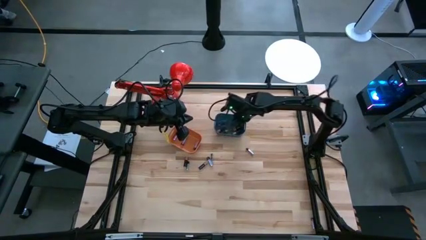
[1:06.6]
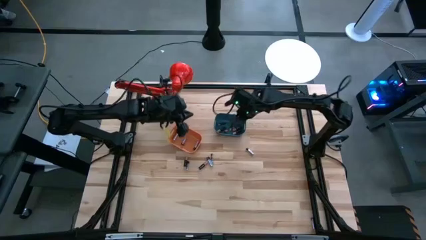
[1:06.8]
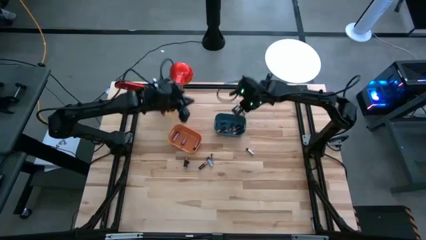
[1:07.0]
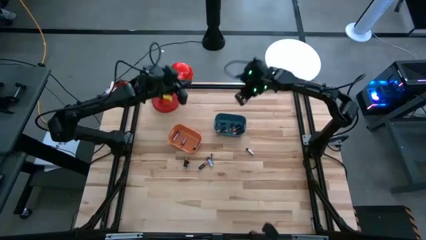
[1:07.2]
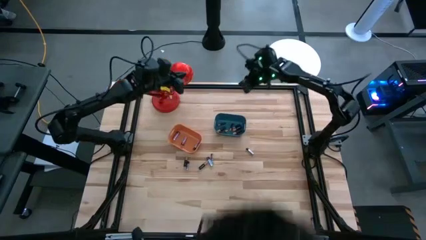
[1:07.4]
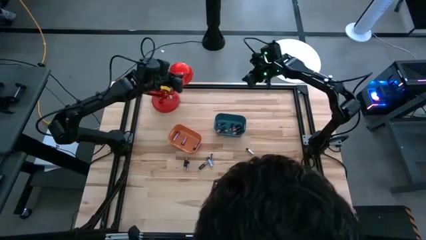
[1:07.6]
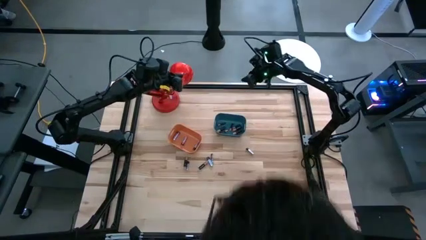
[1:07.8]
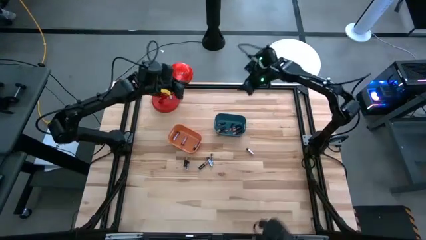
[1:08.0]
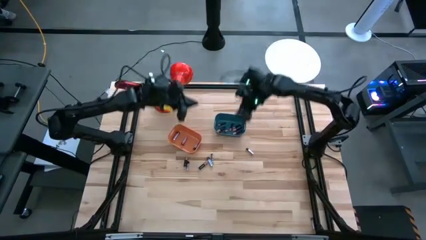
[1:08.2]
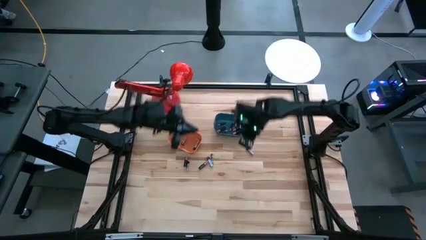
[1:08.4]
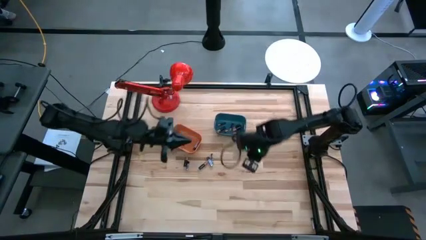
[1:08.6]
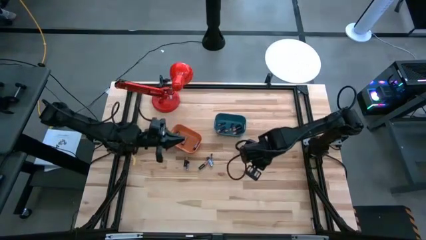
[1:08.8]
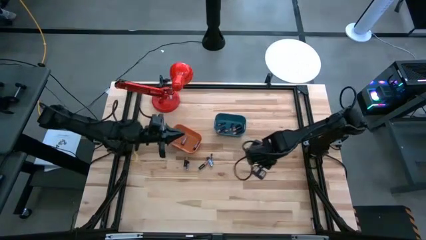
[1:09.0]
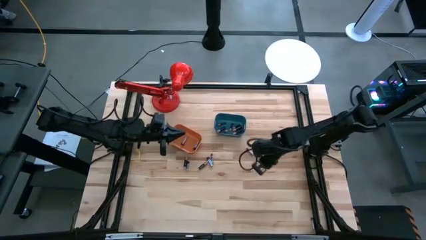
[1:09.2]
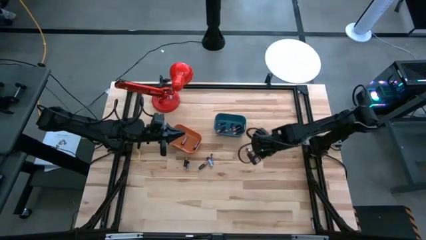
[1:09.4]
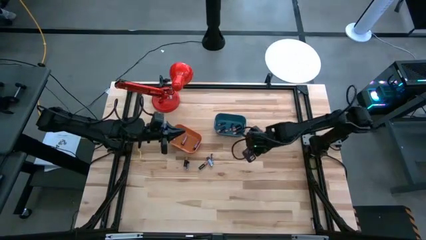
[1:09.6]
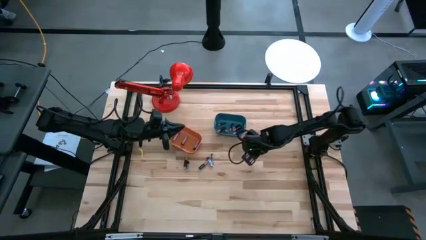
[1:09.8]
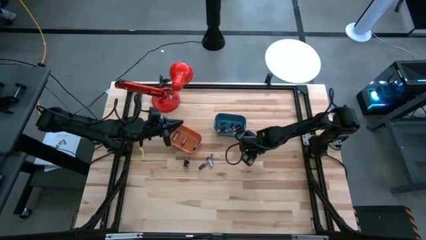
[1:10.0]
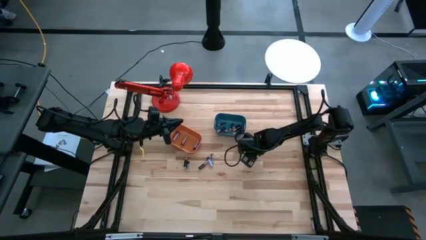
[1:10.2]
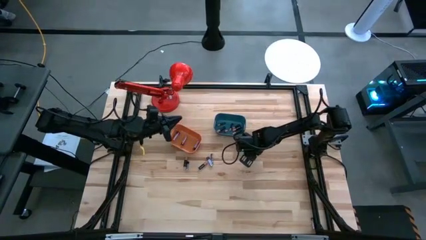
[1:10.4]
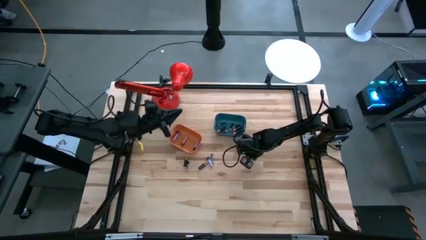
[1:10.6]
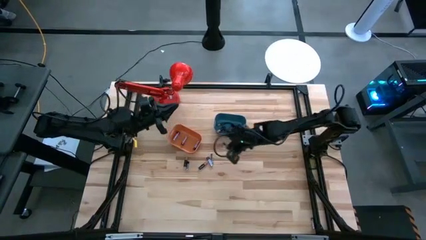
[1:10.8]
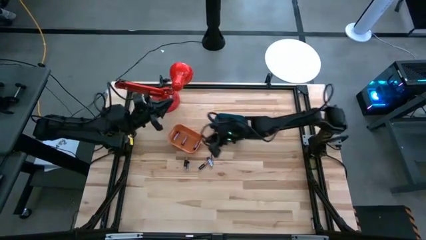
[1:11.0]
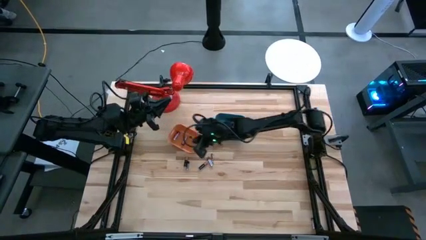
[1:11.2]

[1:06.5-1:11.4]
Task: Sort batteries
Put the silver battery into the orange bin

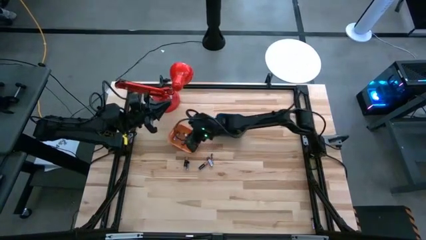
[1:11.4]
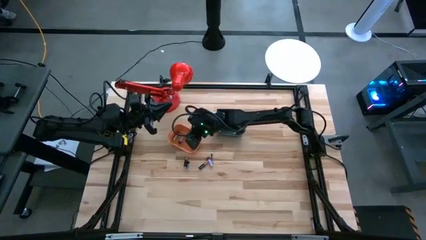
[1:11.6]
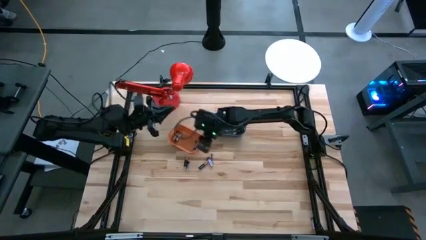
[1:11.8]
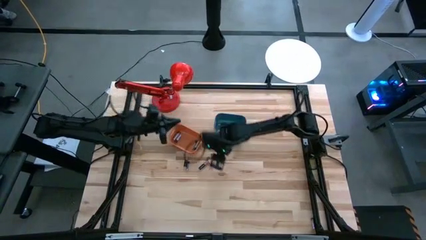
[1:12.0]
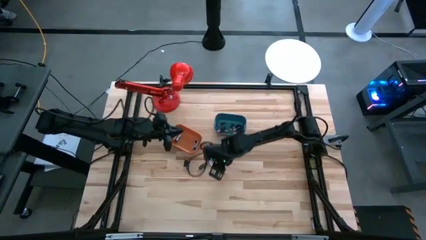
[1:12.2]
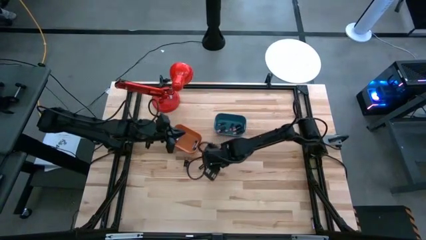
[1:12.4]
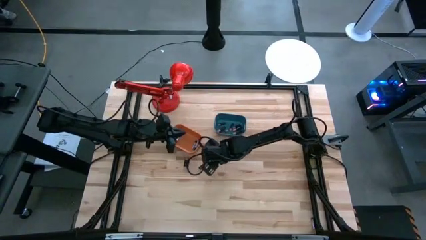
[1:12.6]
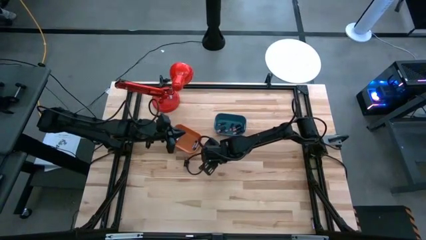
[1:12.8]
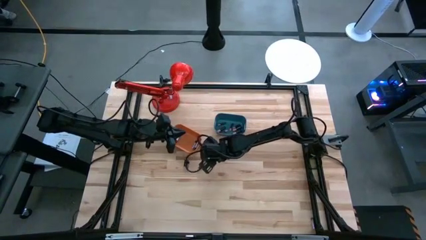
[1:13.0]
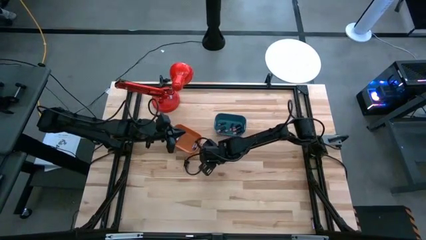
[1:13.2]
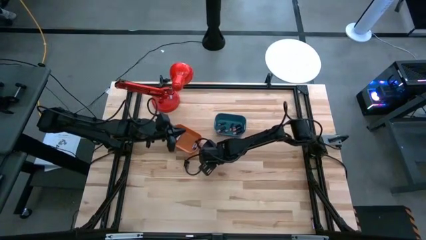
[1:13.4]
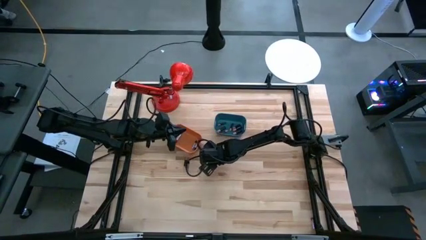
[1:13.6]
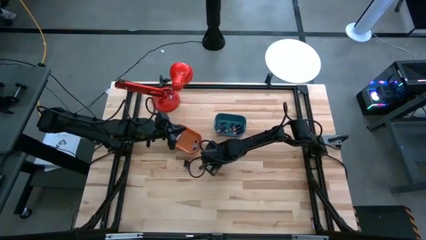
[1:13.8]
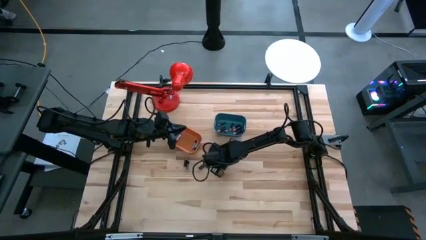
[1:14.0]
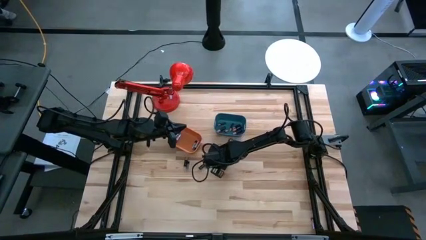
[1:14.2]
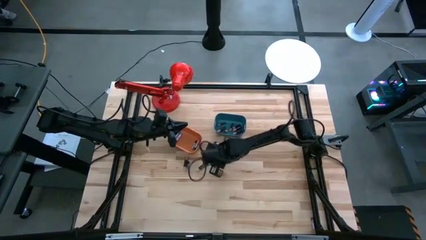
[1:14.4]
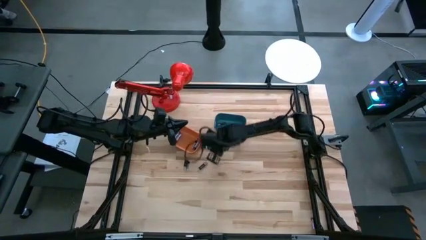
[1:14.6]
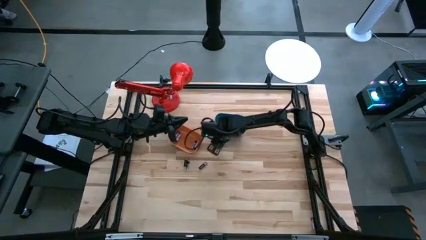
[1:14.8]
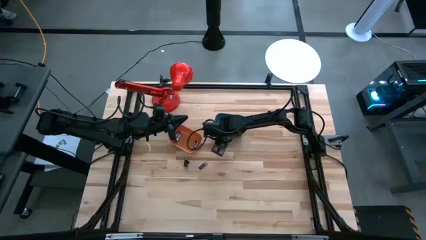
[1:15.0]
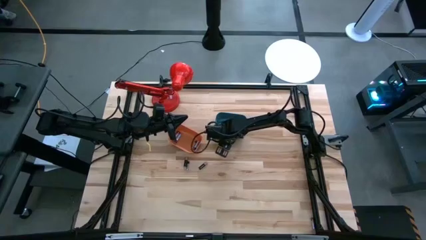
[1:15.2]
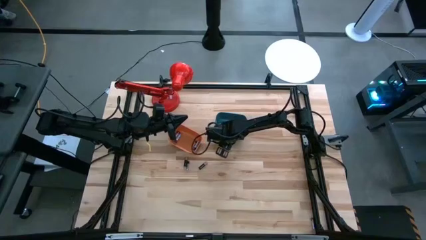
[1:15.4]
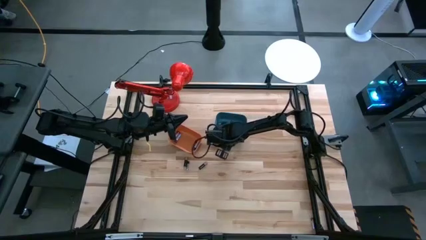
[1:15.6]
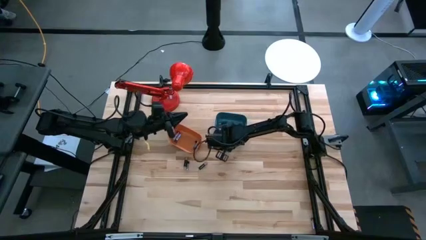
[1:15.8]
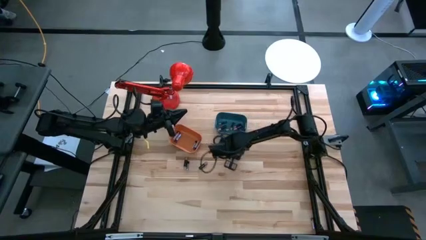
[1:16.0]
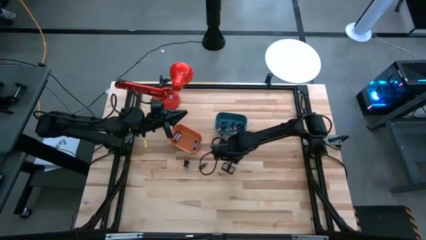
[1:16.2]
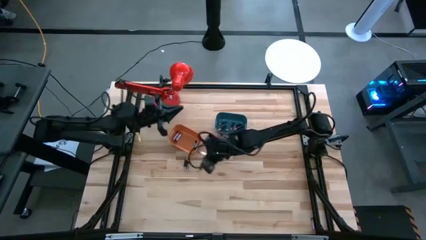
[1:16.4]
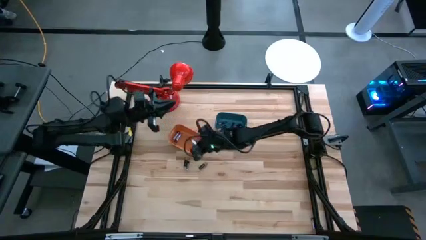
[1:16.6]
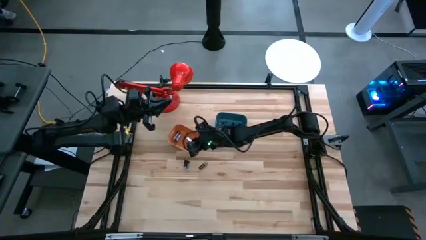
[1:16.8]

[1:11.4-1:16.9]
Put the silver battery into the orange bin

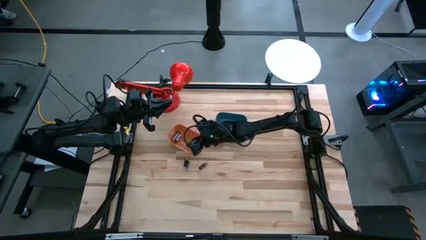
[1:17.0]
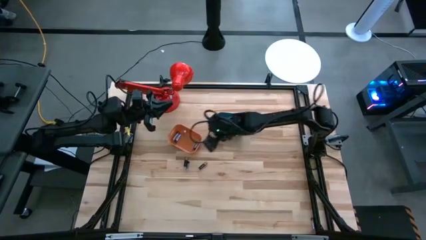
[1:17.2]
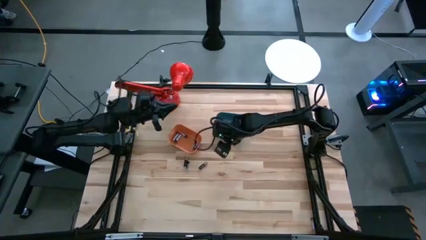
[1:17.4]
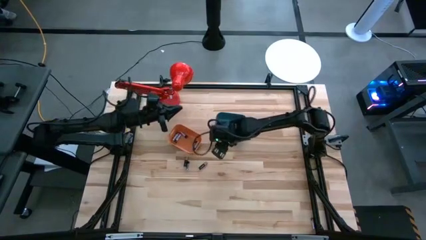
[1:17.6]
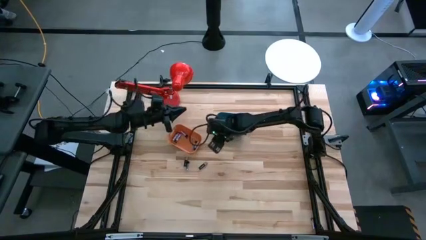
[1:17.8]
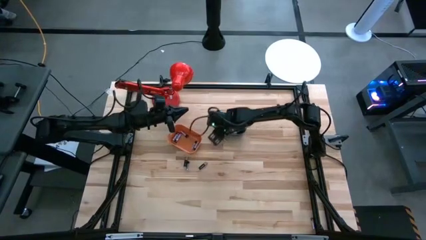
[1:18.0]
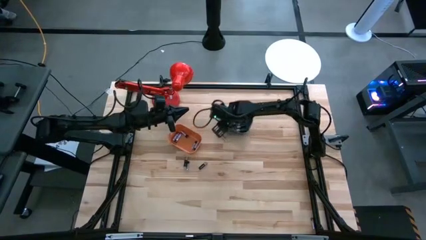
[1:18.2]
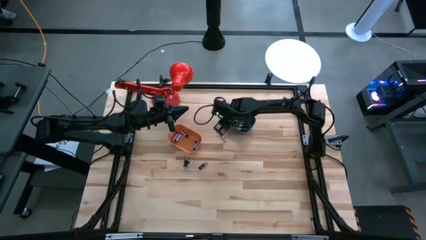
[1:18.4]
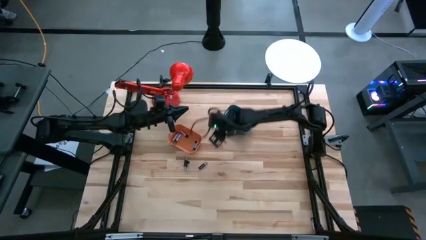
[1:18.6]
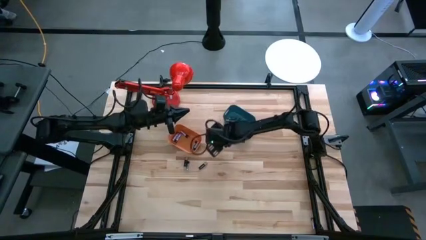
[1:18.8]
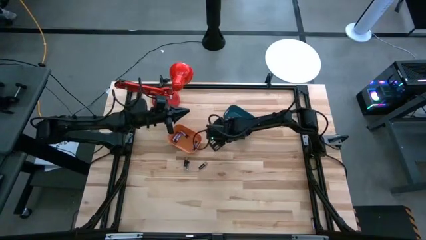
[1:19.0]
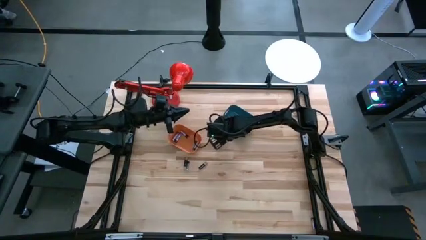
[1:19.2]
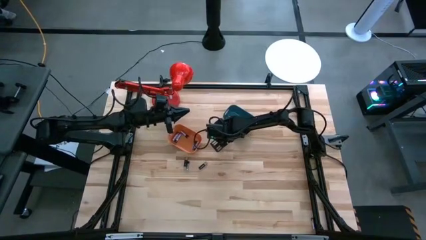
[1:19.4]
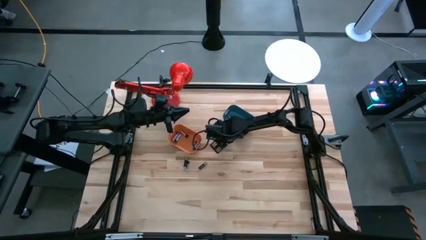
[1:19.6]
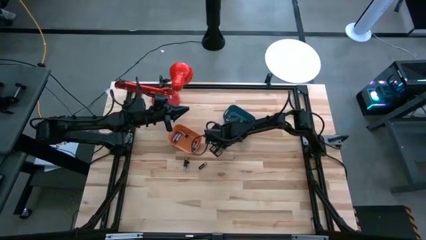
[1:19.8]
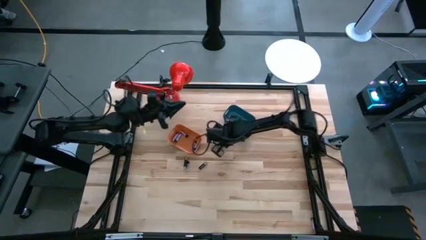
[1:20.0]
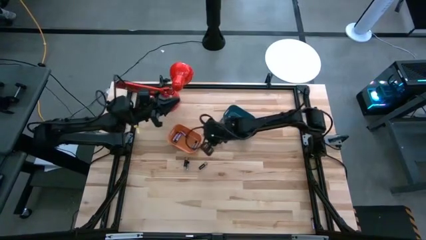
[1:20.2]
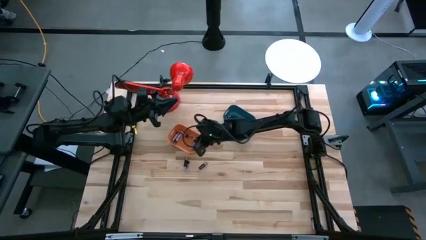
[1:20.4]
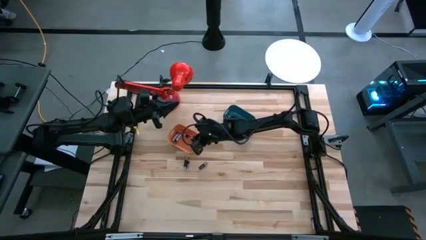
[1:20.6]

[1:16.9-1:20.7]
Put the silver battery into the orange bin

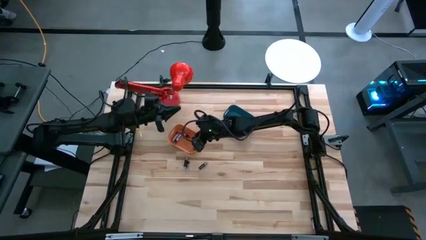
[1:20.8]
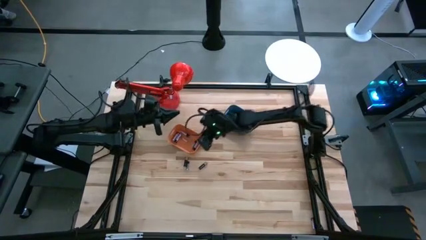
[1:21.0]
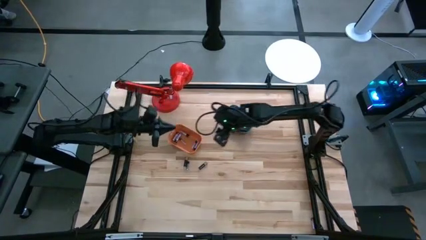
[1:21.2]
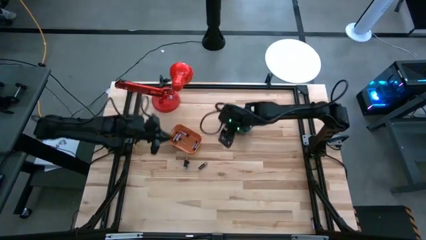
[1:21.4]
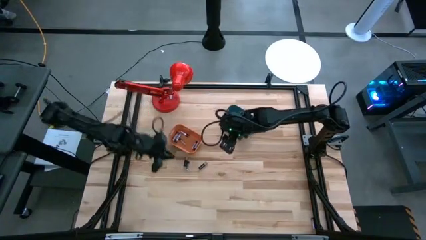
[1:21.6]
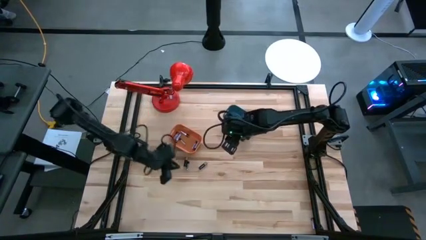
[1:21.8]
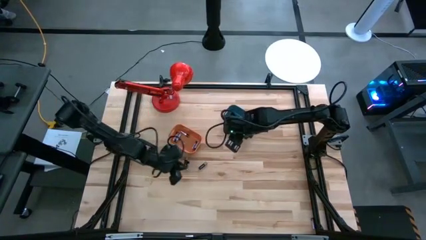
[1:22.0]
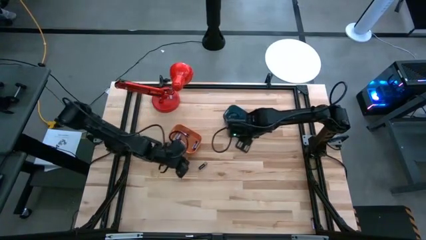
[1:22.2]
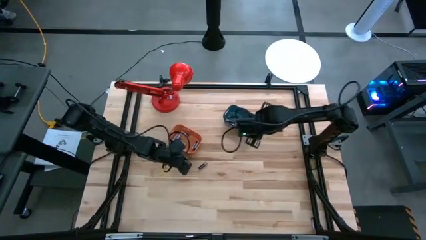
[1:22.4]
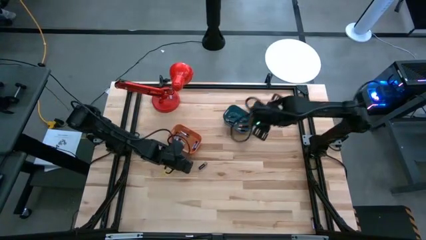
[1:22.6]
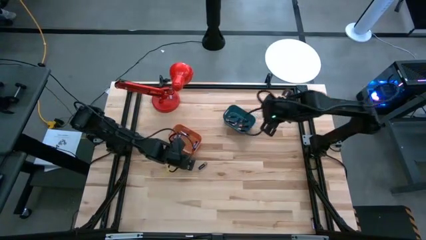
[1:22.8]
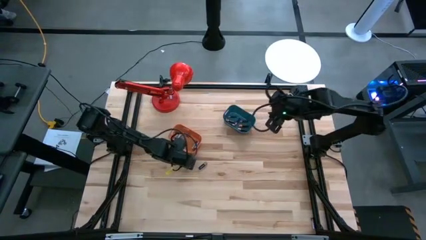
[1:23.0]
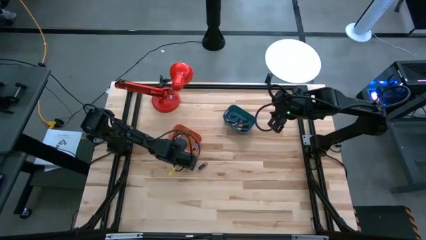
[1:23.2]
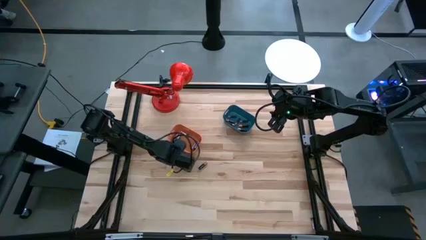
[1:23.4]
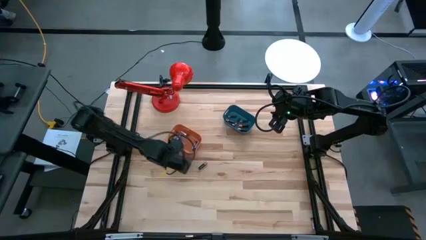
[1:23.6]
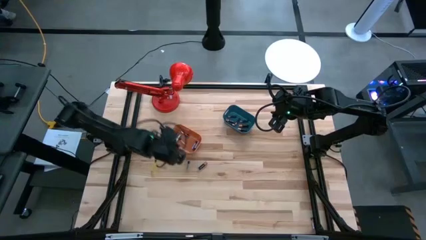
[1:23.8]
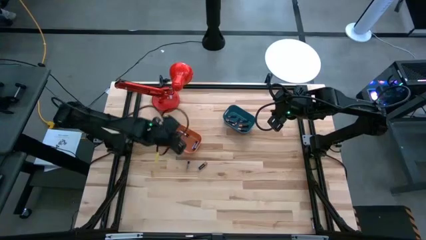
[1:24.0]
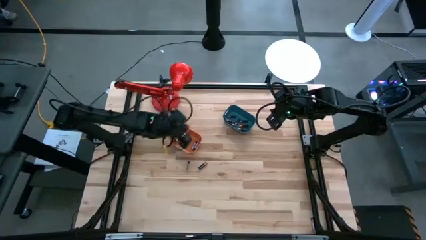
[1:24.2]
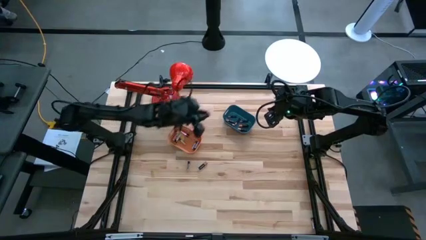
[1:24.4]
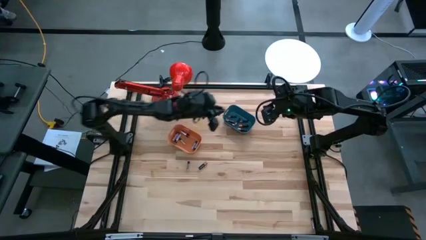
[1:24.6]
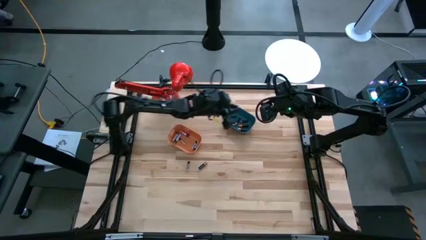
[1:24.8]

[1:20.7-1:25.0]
Put the black battery into the blue bin
